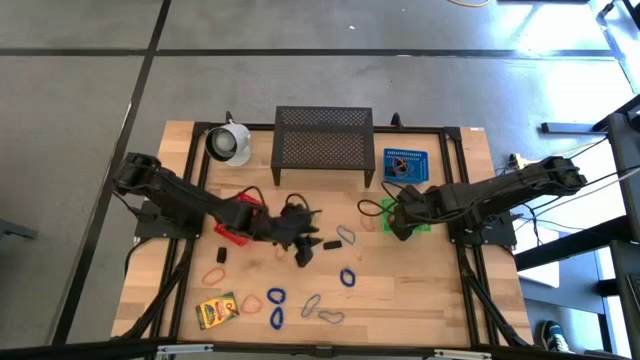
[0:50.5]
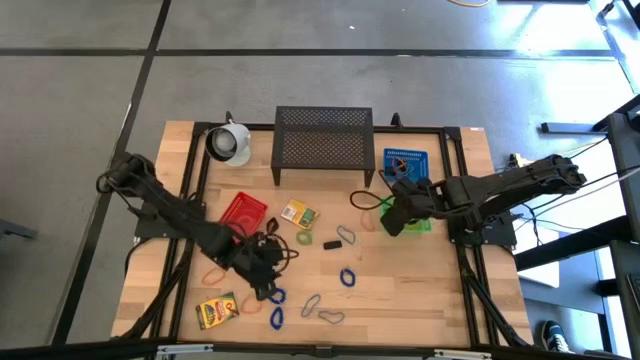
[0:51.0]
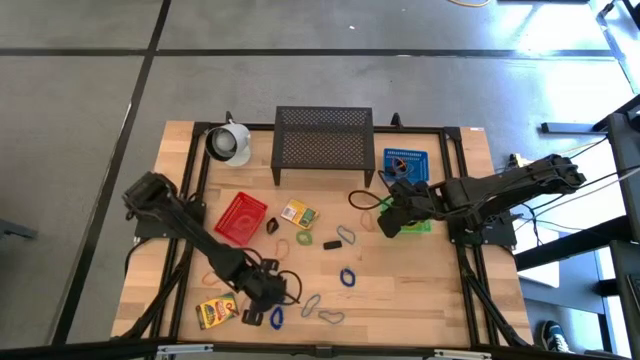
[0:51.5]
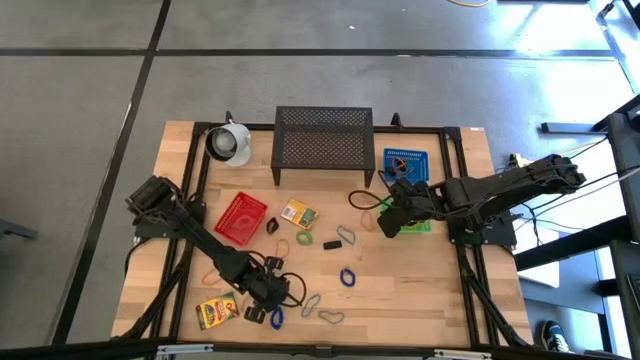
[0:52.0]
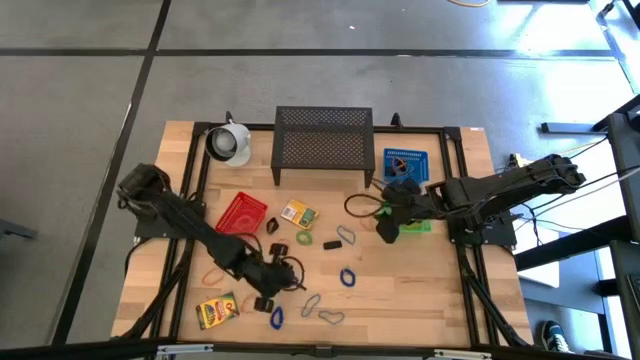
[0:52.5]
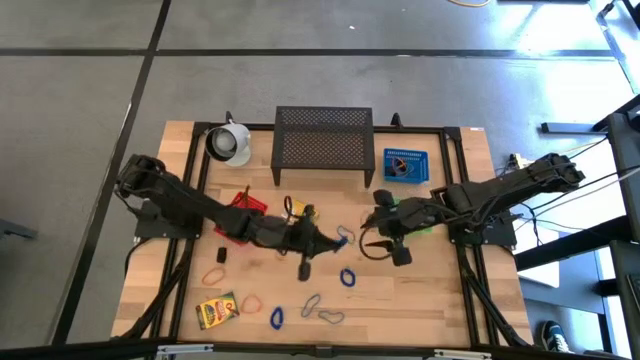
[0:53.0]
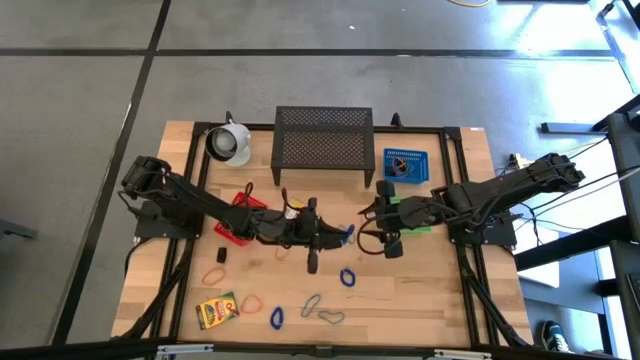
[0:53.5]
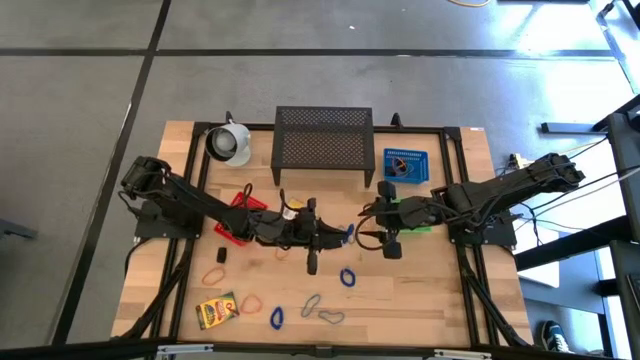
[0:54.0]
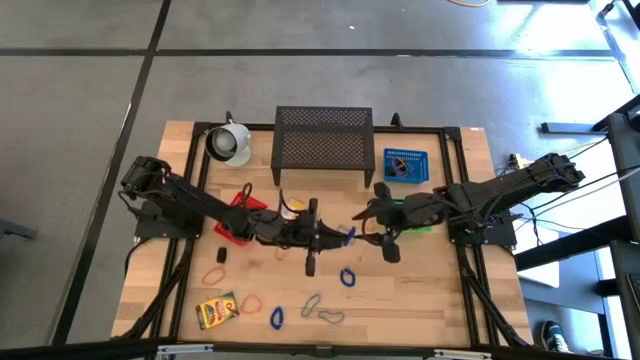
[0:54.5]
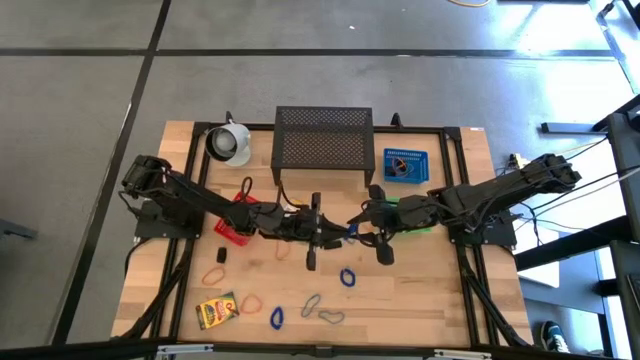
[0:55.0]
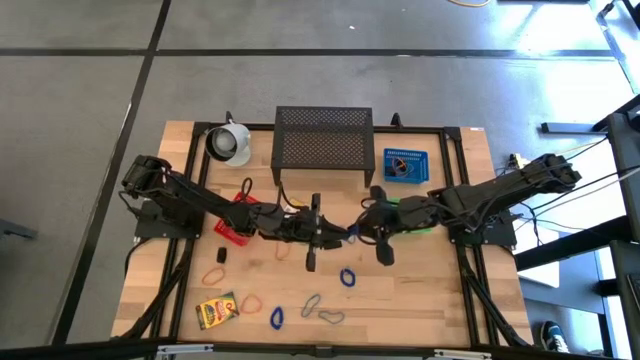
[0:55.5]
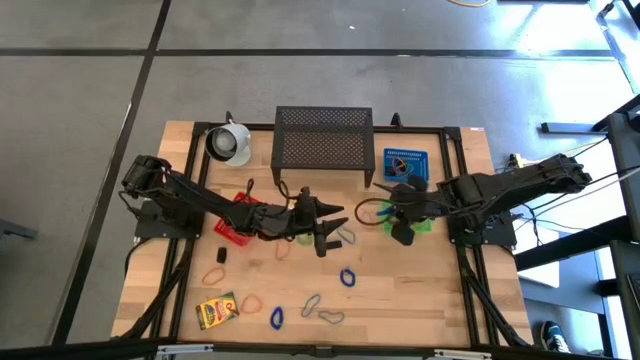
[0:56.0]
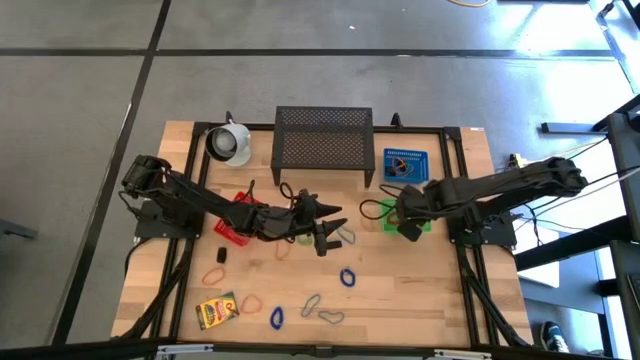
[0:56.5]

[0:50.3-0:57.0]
Task: Pick & Place Office Desk Supplies
Put the blue spring keychain into the green bin

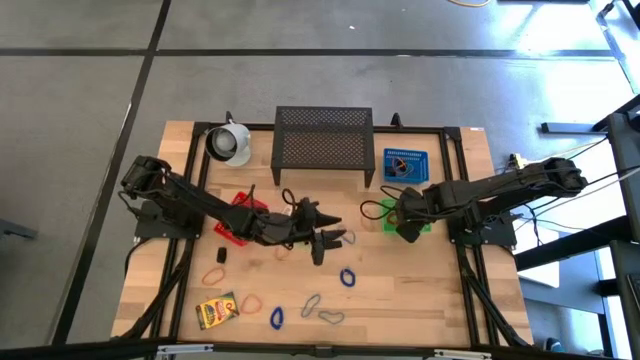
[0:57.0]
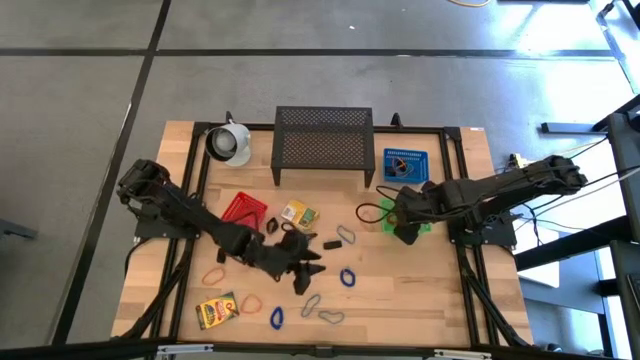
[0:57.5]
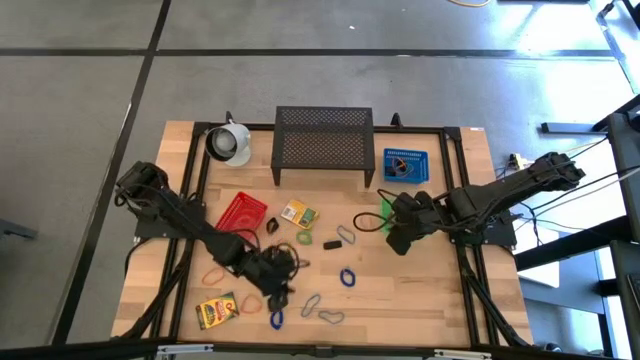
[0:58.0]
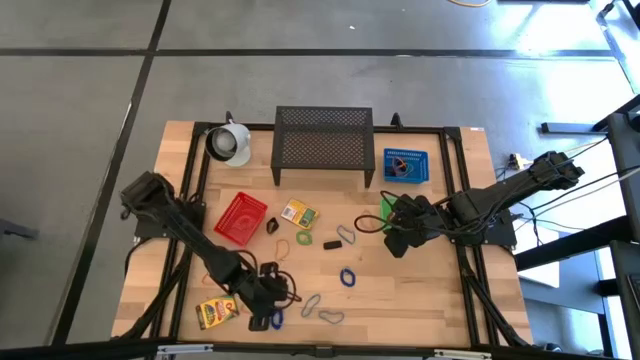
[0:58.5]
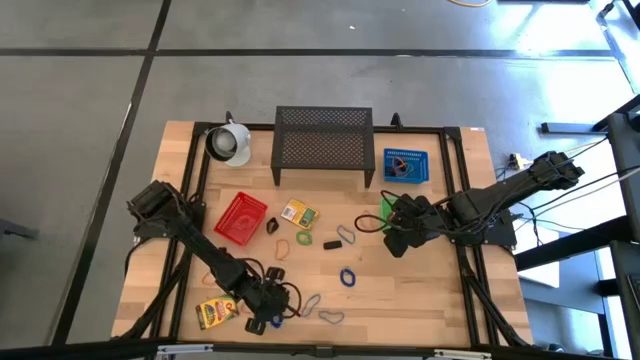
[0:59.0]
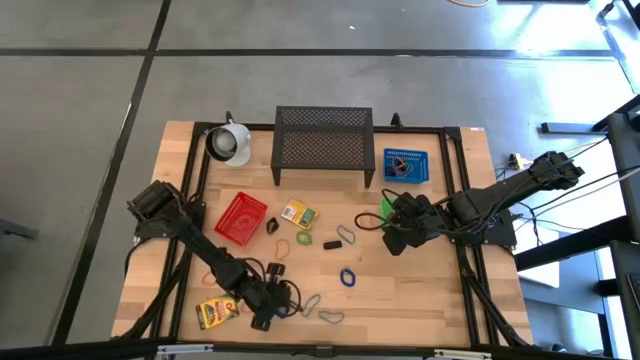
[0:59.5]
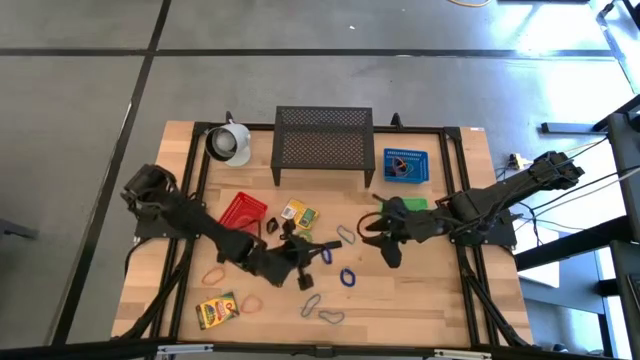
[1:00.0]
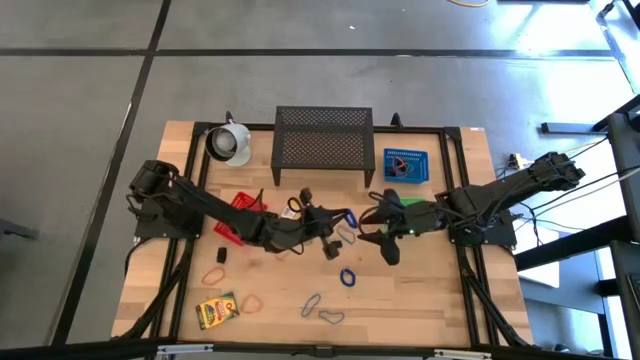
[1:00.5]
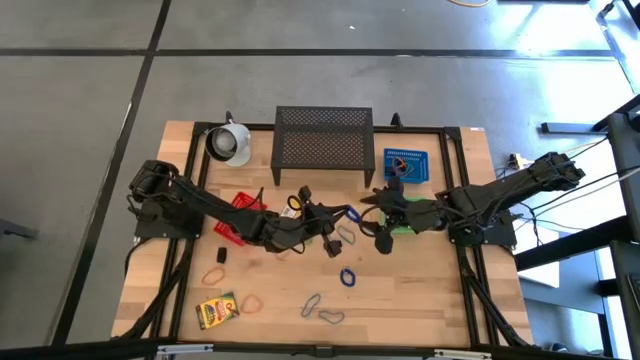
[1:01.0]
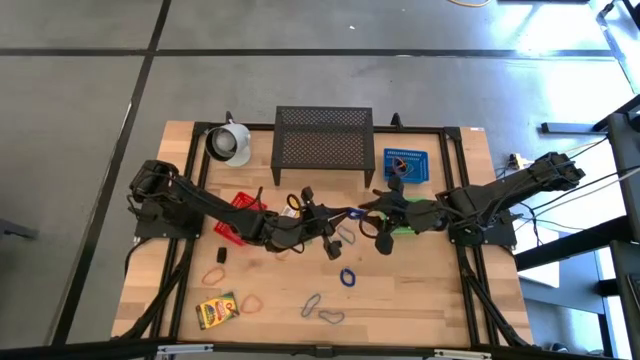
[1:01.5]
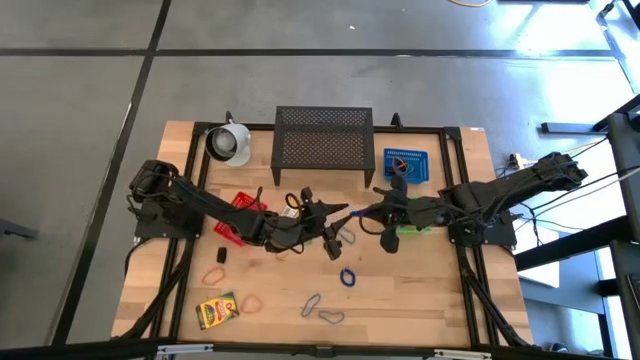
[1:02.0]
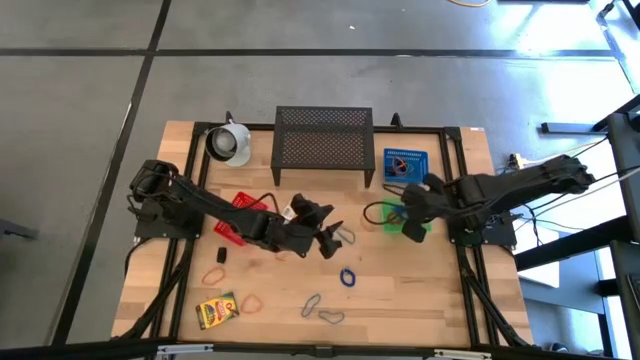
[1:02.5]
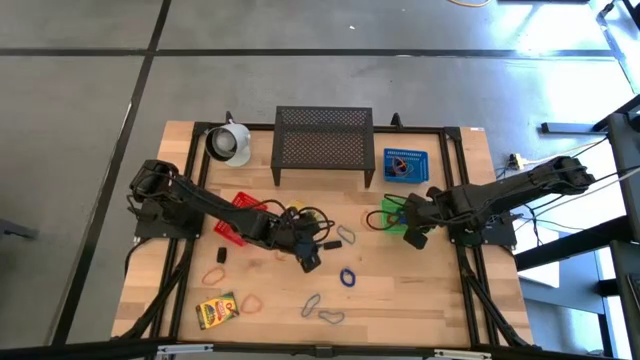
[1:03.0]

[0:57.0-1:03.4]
Put the blue spring keychain into the green bin

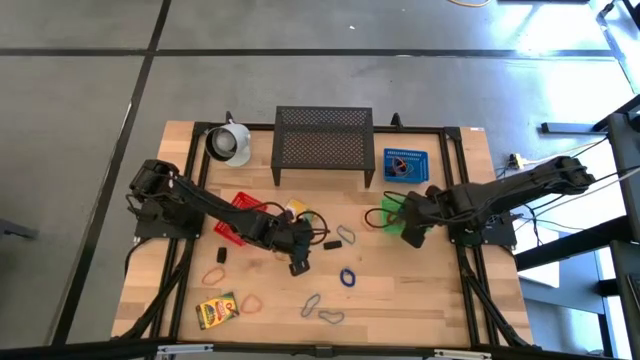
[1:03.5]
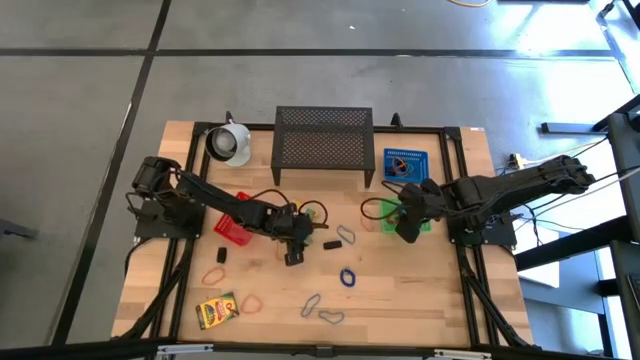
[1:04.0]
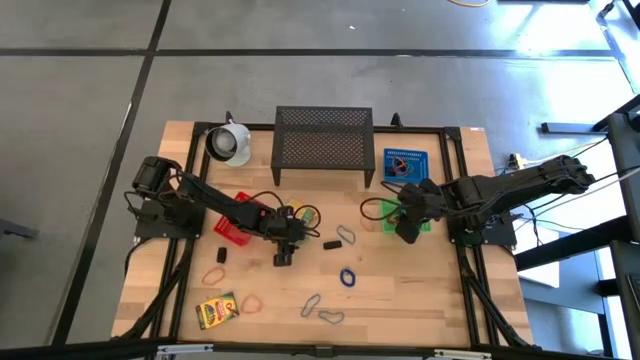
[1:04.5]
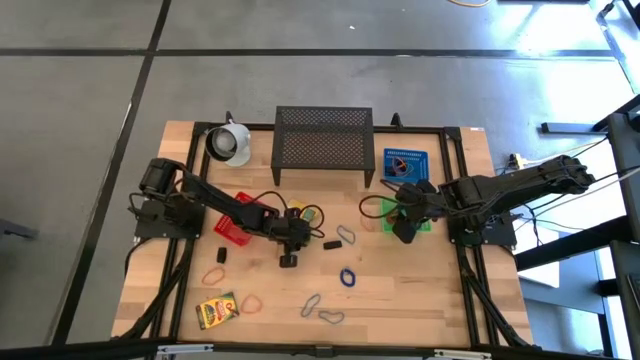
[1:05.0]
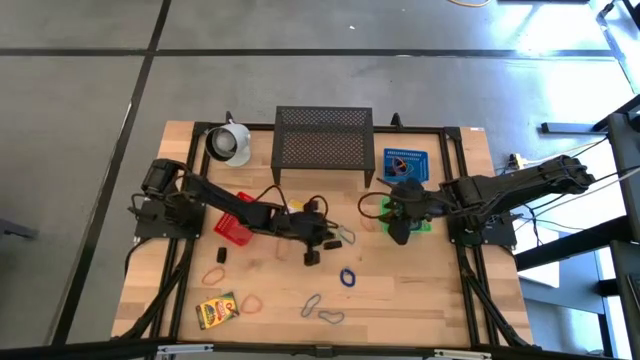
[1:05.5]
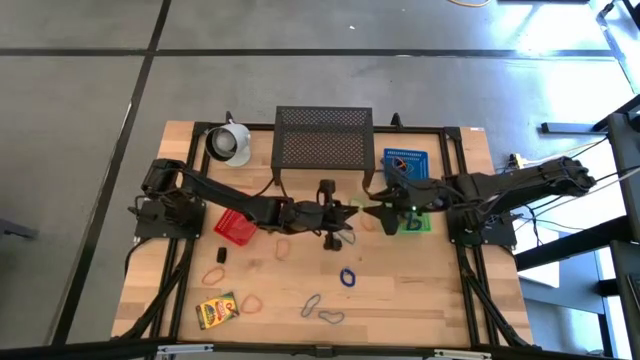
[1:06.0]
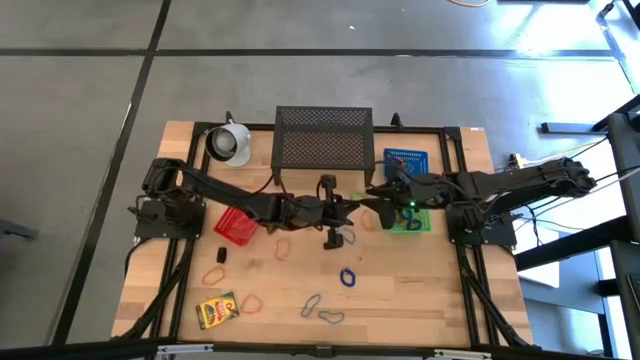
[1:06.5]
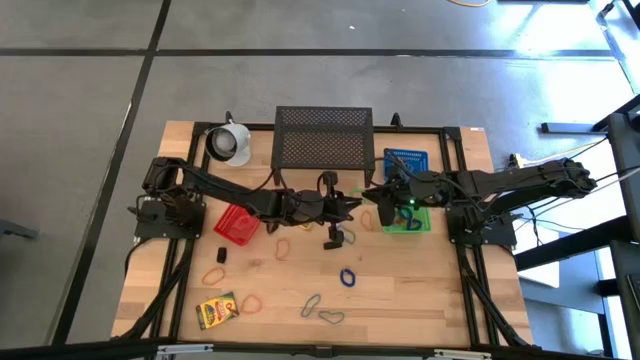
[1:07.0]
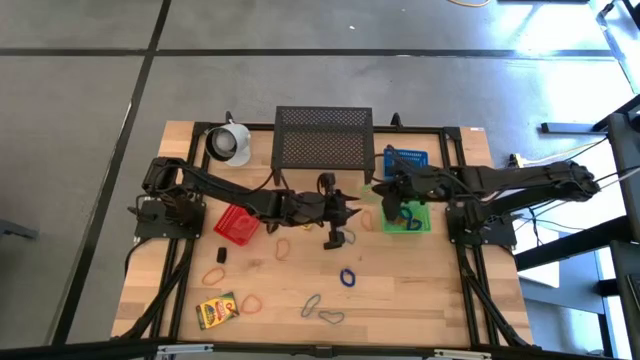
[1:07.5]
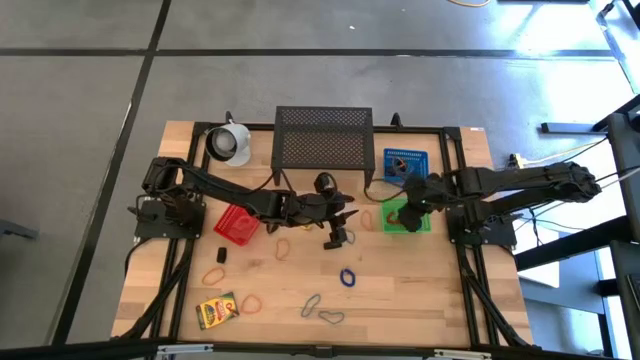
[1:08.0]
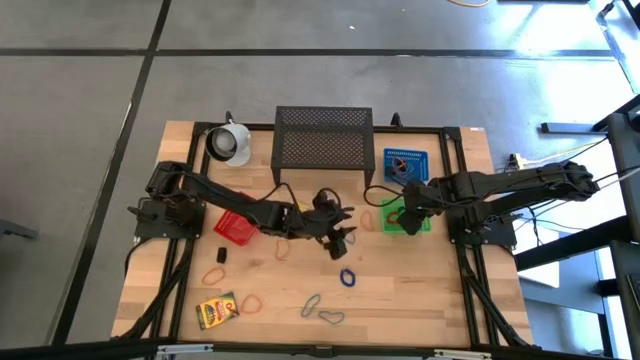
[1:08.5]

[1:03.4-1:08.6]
Put the green spring keychain into the green bin

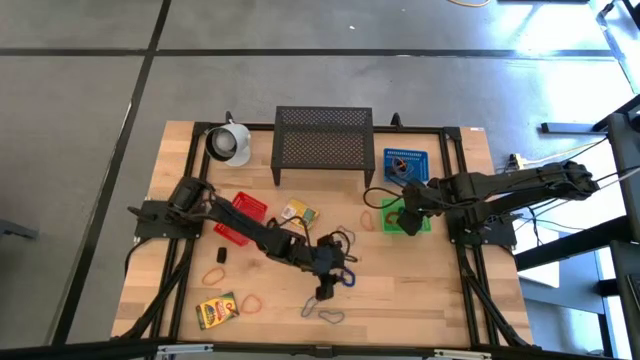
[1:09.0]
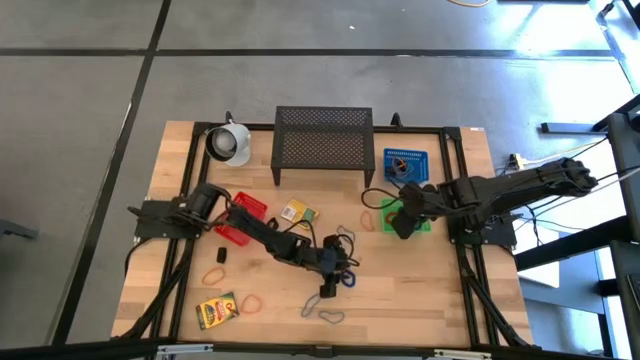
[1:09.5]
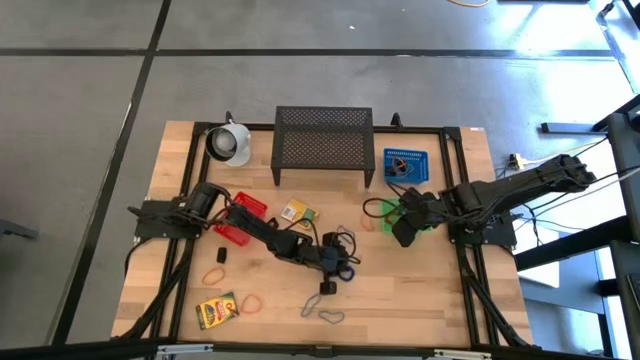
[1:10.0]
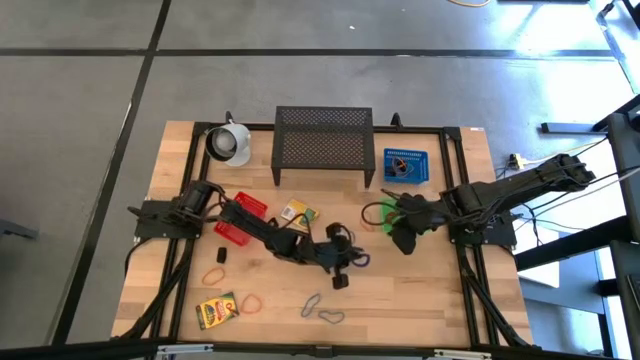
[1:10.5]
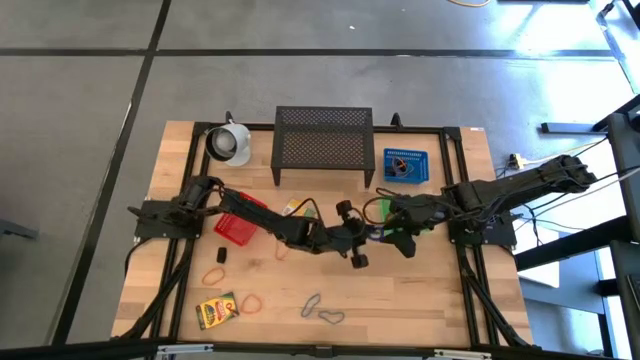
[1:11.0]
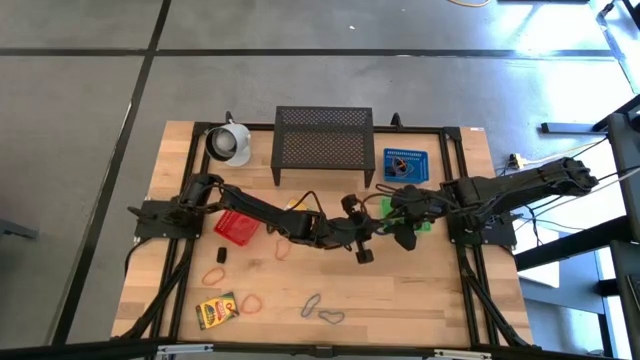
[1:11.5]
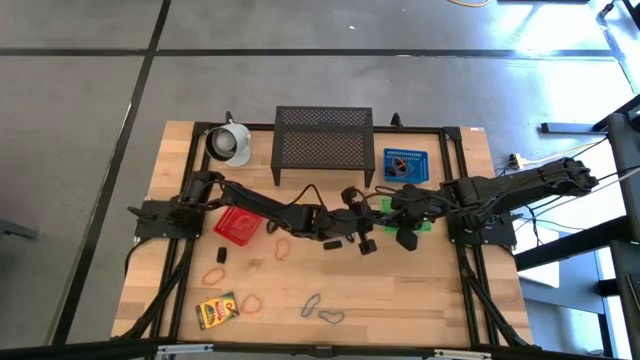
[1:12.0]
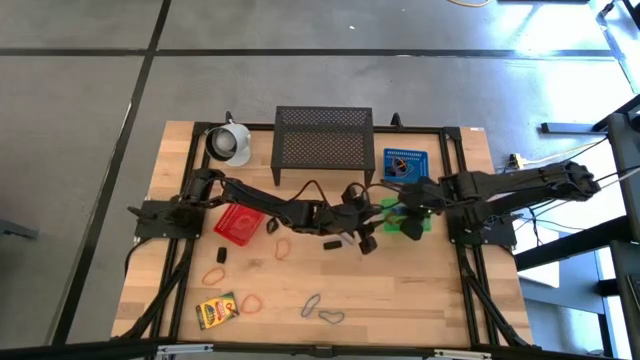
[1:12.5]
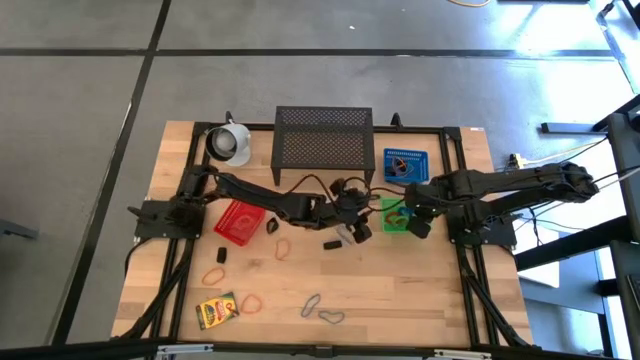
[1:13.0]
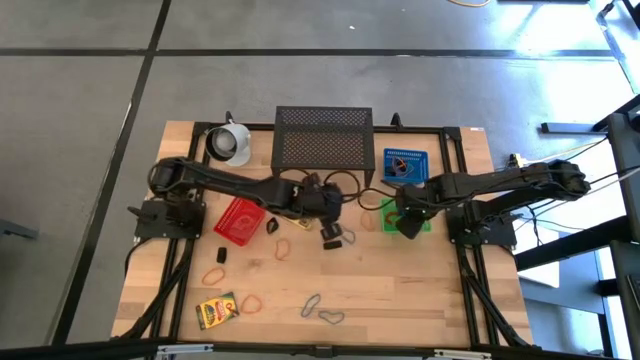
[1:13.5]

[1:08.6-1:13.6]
Put the blue spring keychain into the green bin
